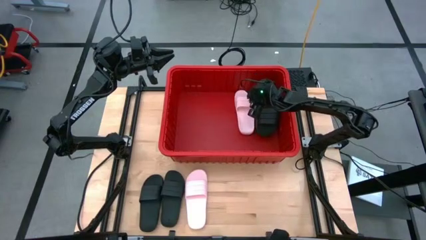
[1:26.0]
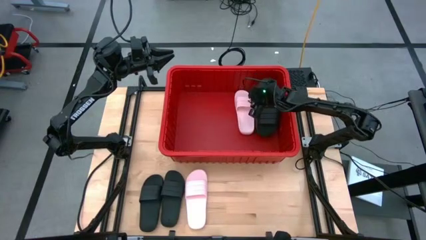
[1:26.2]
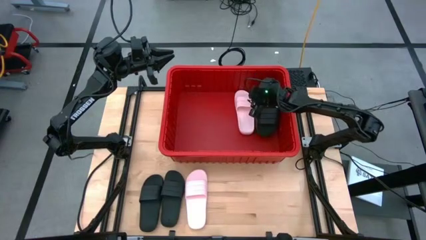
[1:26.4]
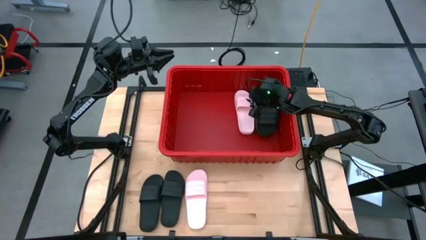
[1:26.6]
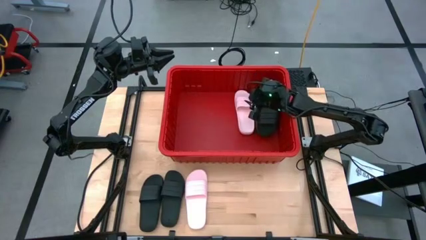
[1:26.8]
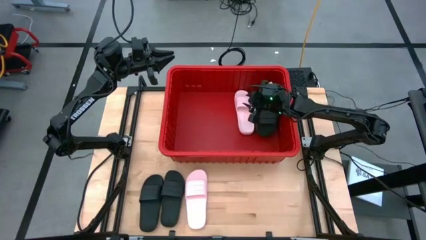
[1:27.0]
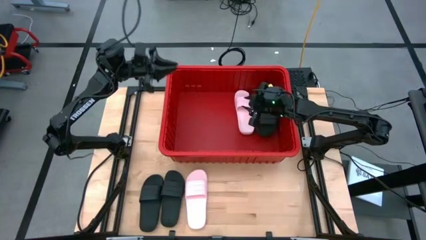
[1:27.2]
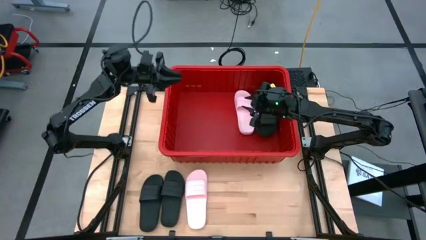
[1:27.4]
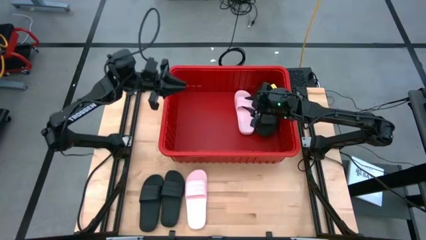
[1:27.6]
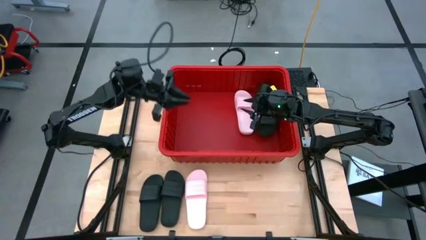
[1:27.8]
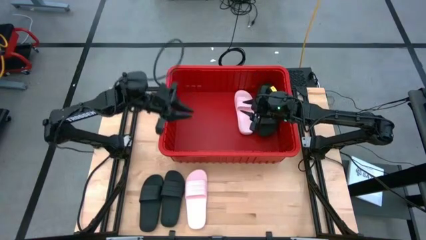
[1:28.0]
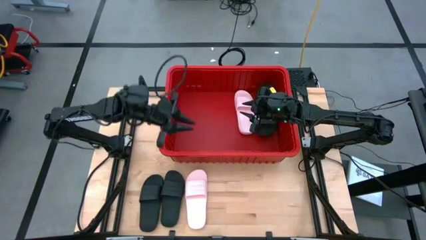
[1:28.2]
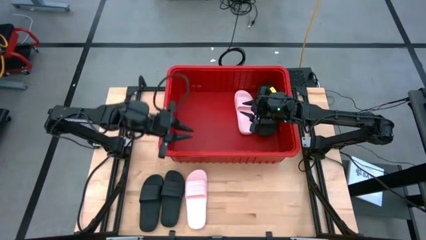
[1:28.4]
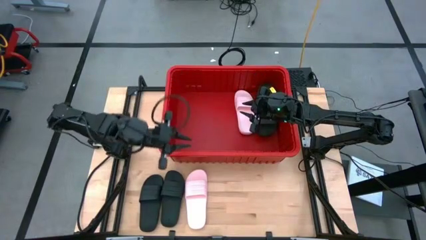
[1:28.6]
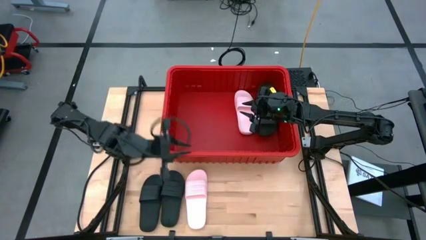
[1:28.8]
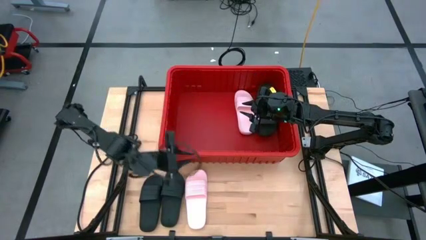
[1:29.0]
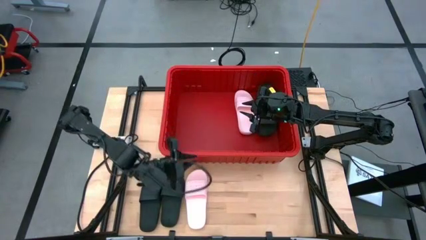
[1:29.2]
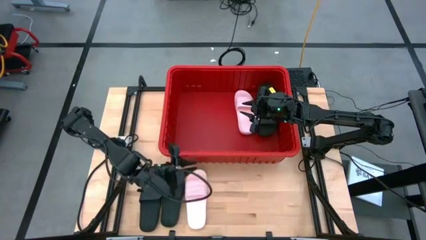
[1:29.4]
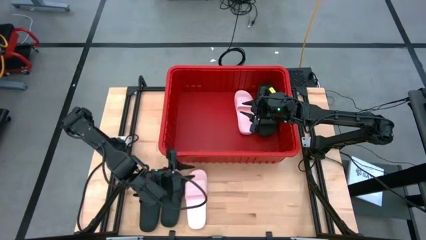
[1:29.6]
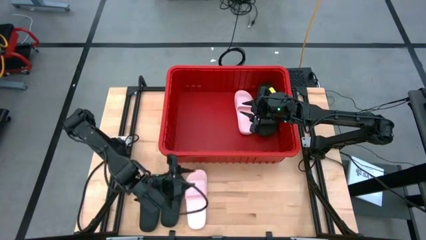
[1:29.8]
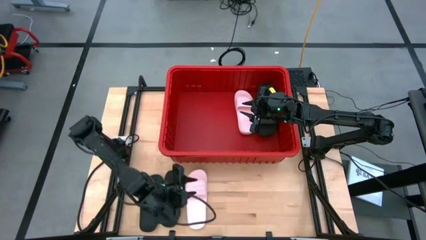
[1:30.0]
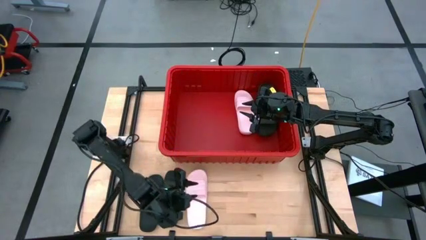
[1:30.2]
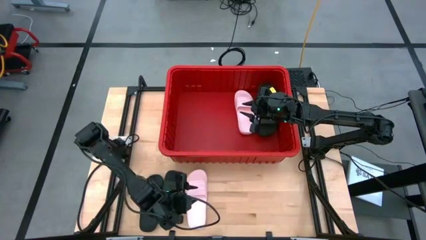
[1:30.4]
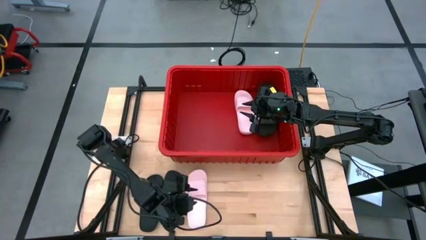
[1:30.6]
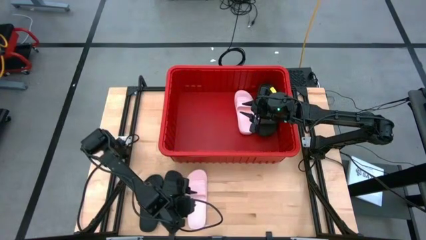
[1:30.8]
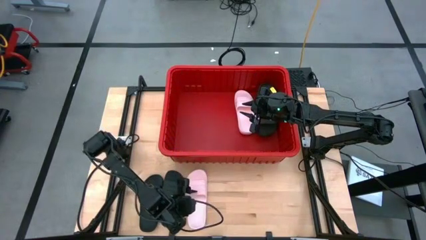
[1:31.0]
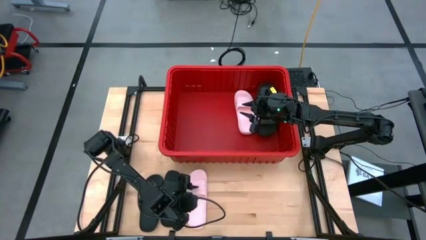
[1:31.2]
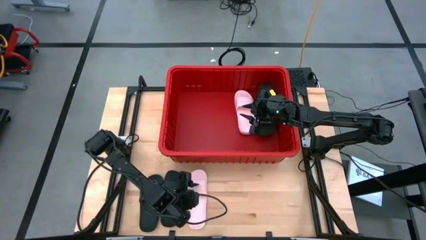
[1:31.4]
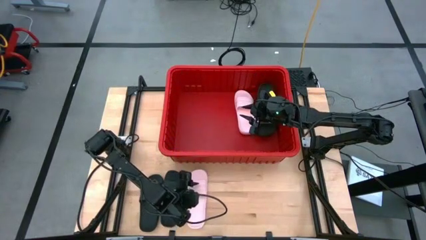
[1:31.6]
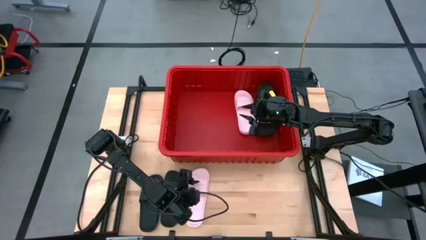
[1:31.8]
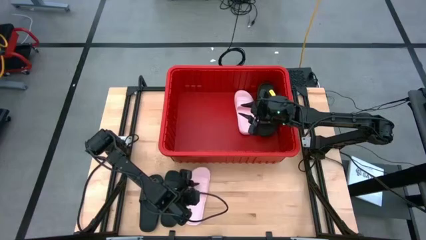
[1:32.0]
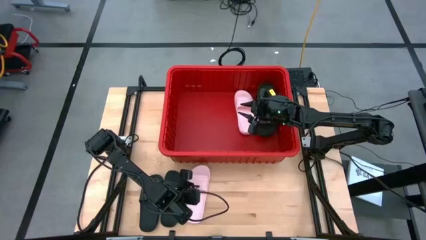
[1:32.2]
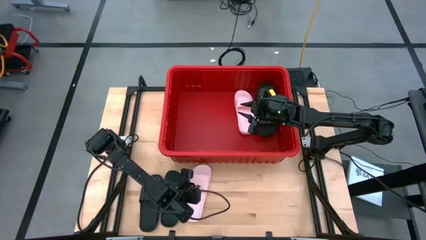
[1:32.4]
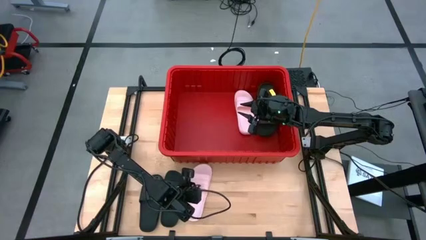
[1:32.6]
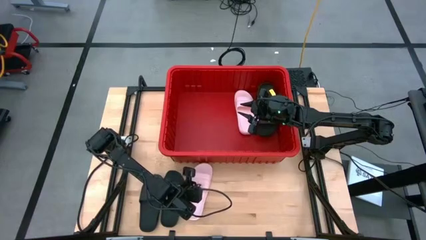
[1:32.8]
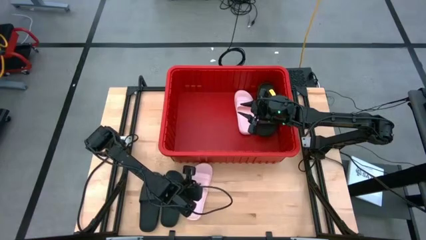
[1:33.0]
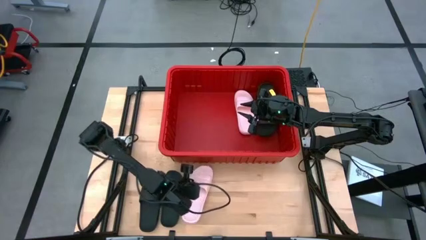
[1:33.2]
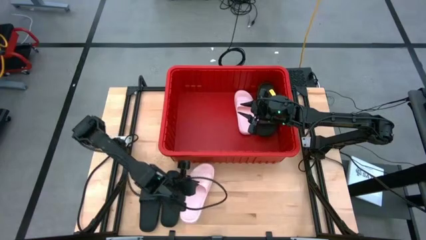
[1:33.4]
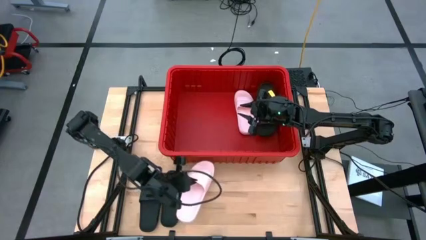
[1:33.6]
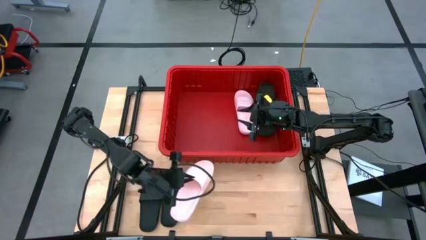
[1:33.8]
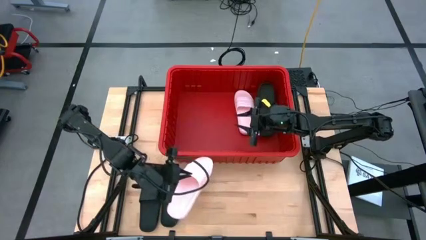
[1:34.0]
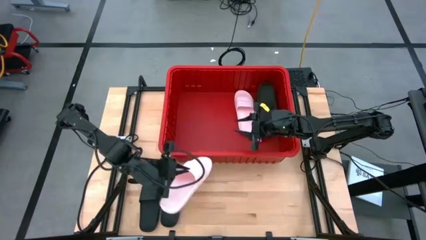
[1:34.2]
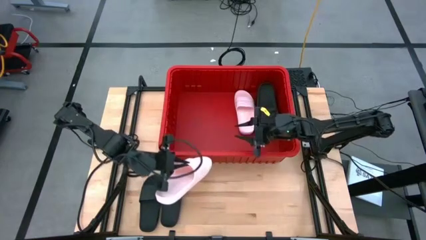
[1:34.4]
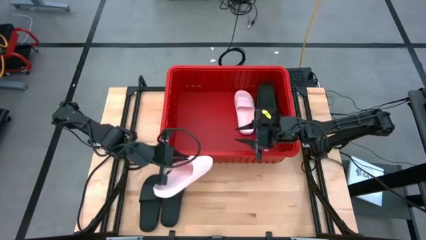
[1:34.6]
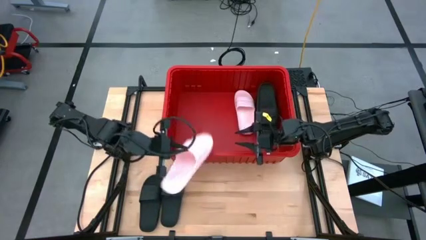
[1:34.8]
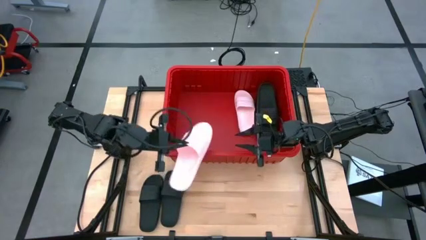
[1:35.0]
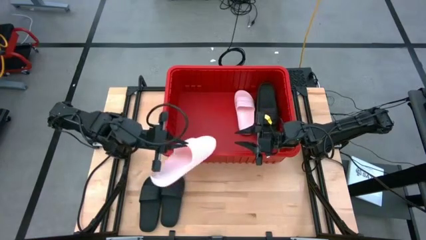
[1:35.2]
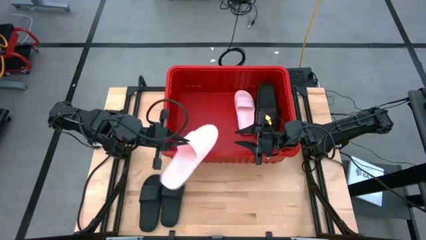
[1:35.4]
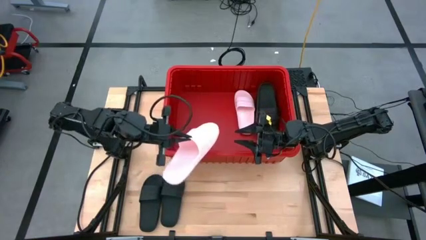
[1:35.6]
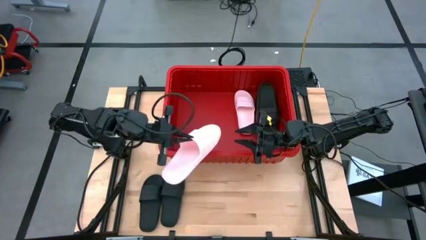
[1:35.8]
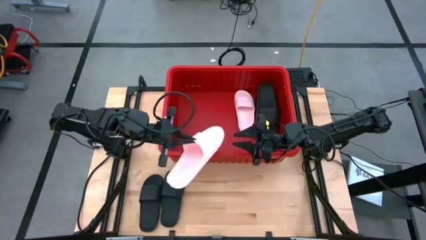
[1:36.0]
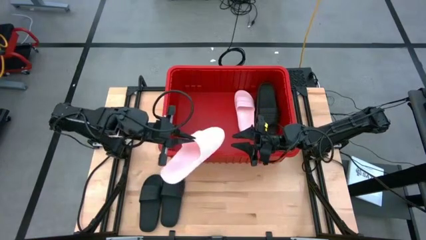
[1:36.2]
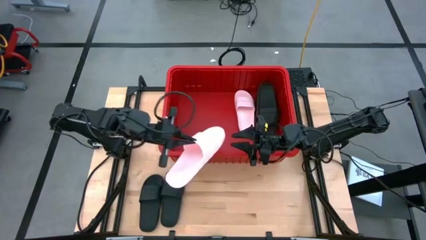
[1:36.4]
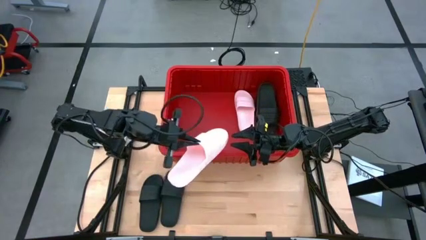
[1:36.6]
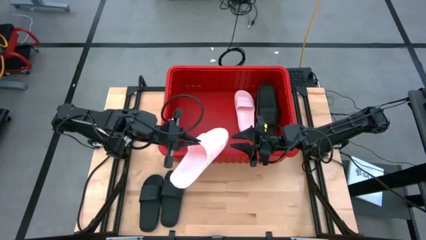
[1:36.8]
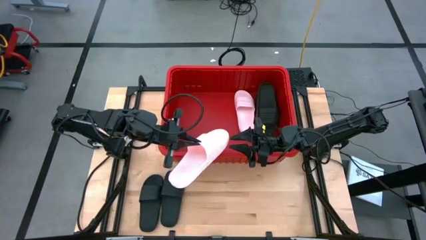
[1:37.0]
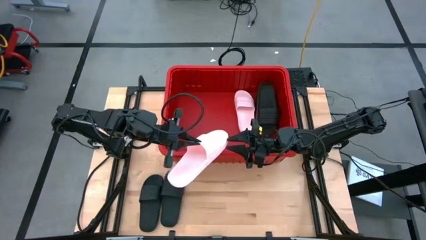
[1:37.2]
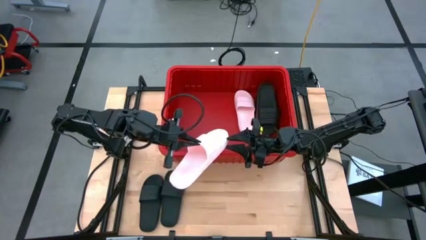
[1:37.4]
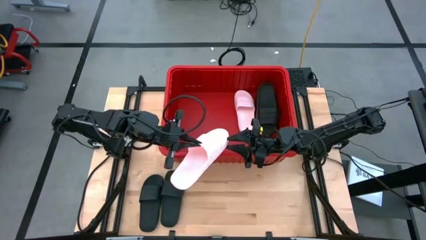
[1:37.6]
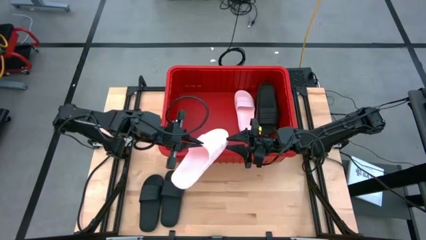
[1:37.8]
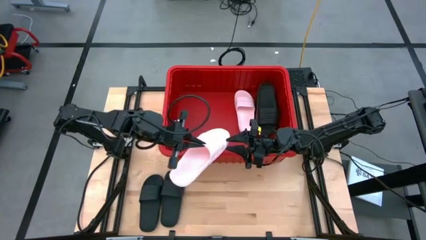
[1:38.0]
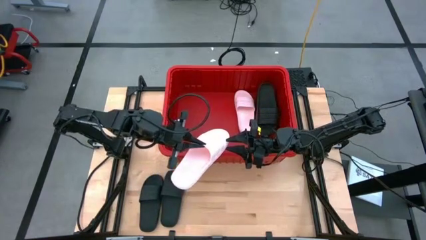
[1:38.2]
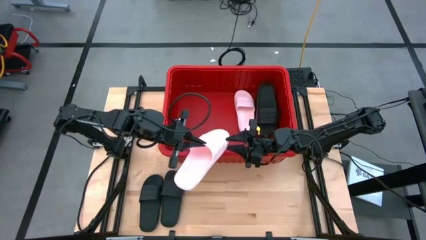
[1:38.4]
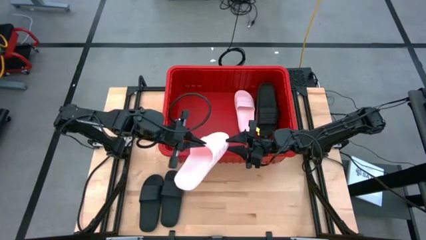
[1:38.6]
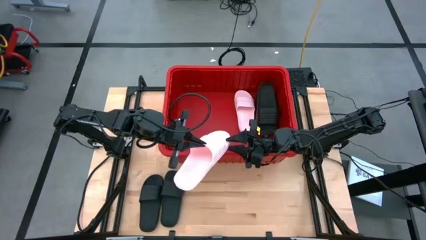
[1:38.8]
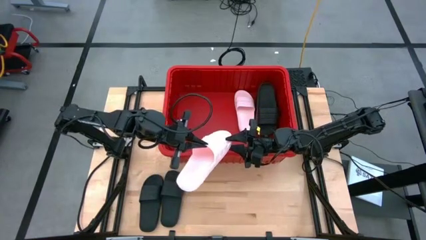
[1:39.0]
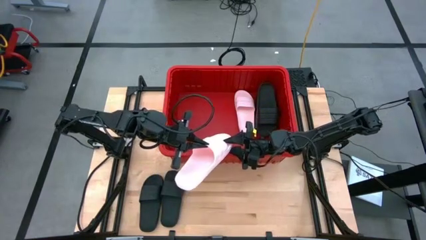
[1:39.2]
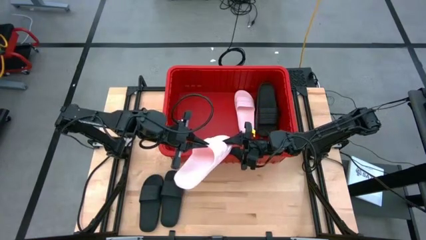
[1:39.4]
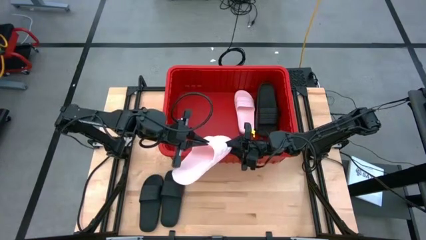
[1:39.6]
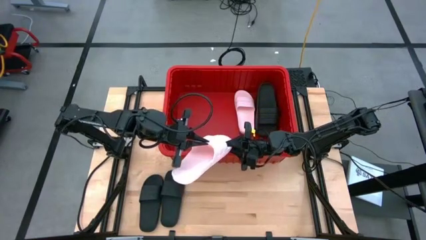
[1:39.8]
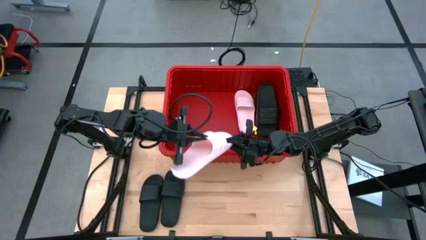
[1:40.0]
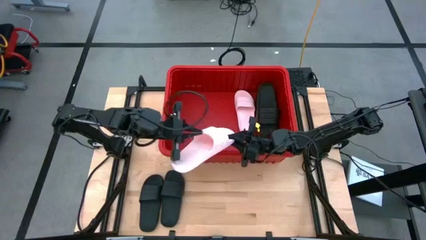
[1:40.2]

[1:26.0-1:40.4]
Task: Pick and place slides into bin
Put the pink slide into the red organizer bin
